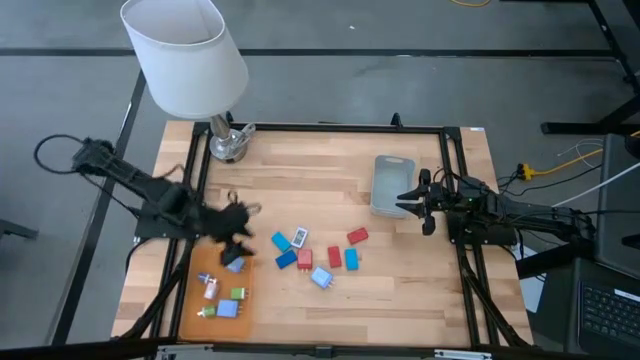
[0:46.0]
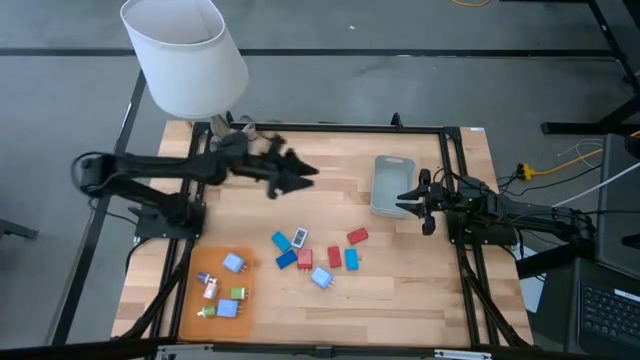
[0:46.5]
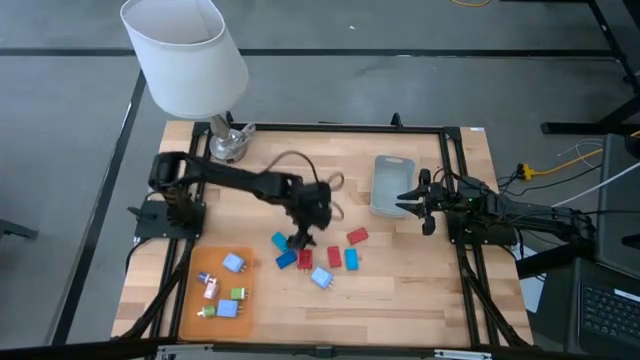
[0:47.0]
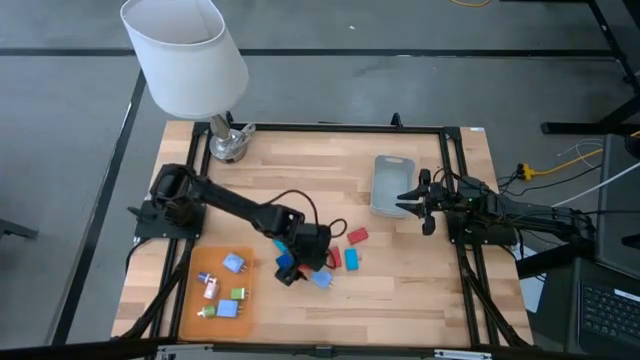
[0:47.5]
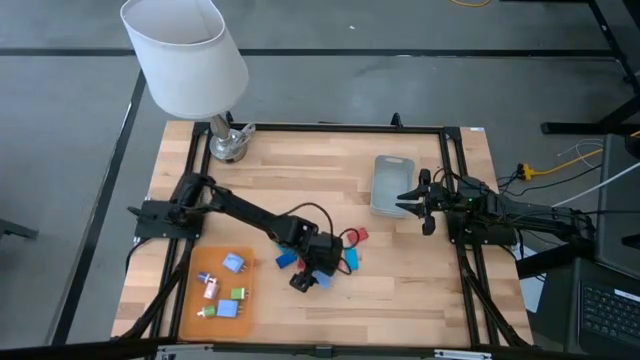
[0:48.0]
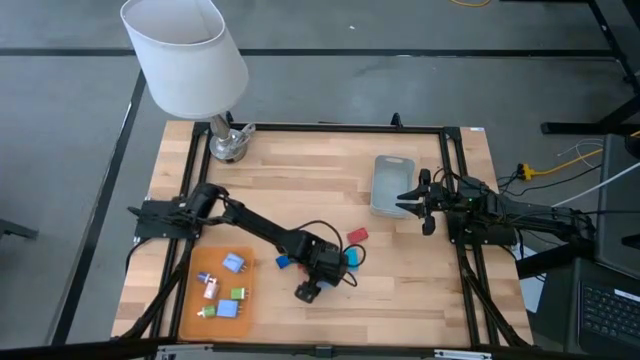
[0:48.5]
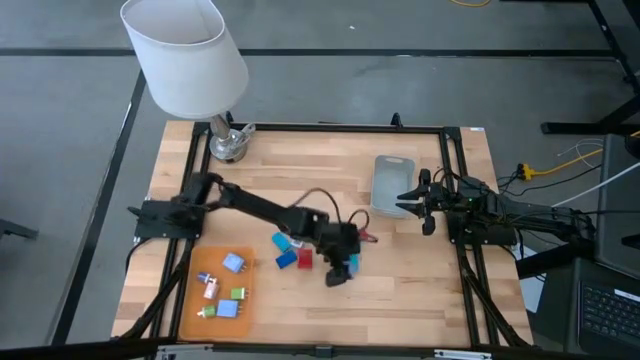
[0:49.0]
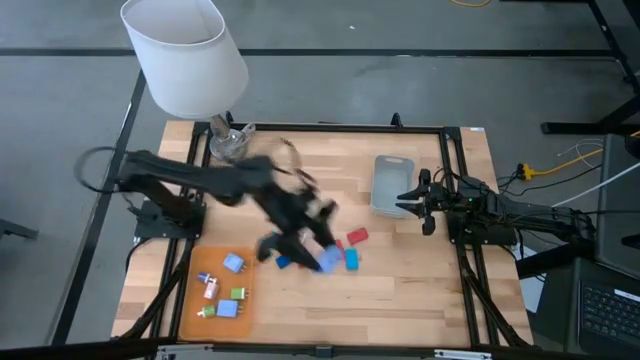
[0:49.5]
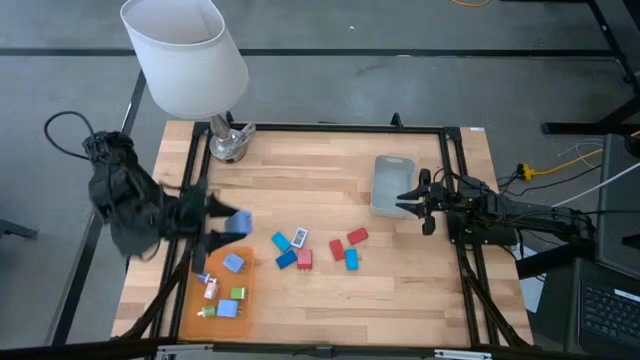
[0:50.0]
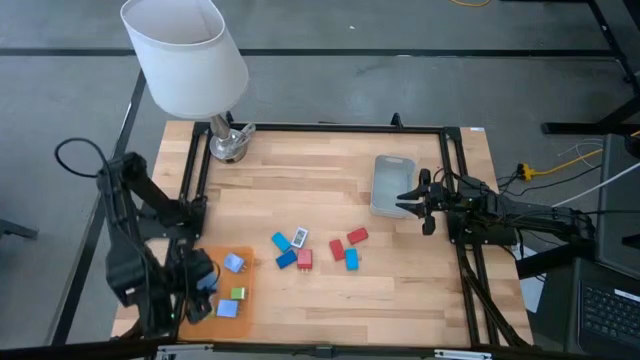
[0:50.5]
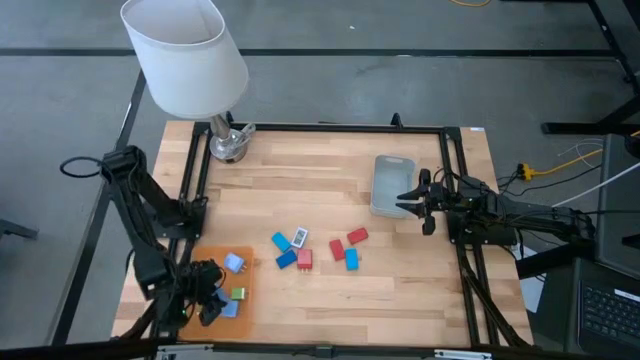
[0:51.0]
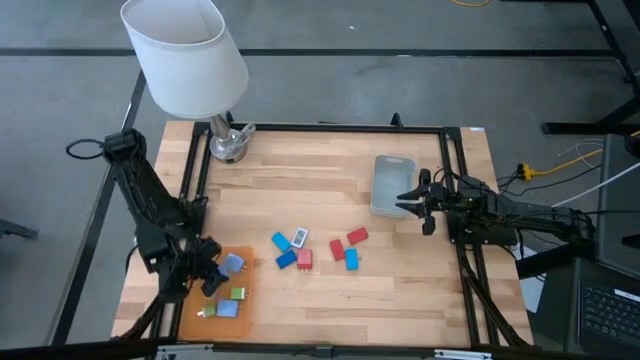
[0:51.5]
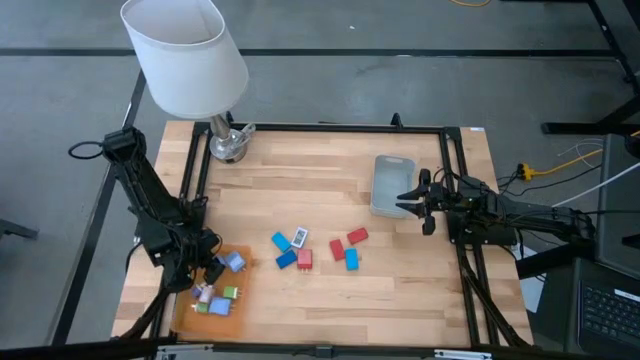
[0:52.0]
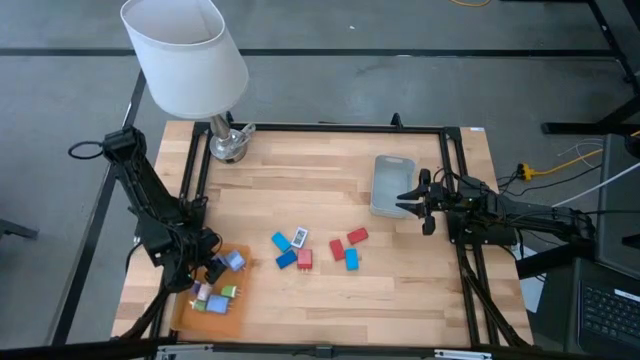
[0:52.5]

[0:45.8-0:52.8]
Task: Pick & Place Office items
Put the light blue charger adapter into the orange bin

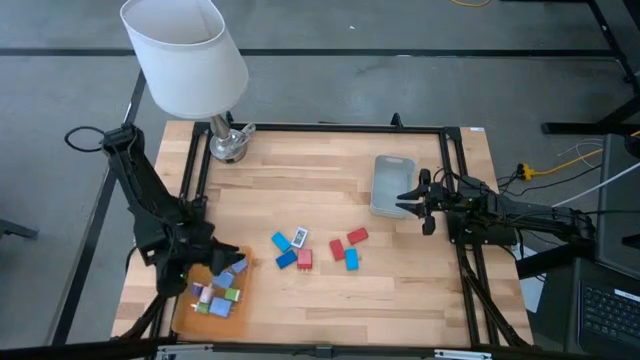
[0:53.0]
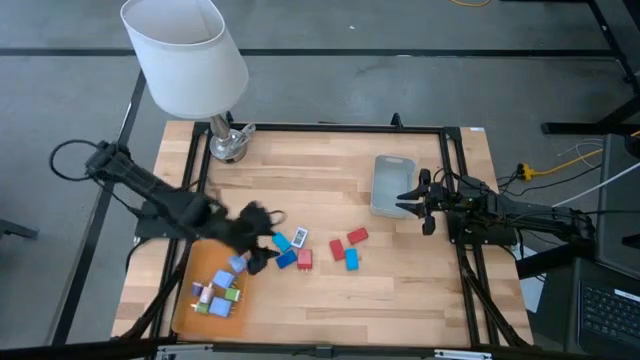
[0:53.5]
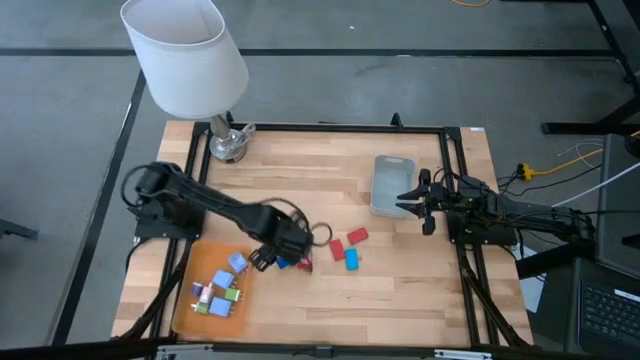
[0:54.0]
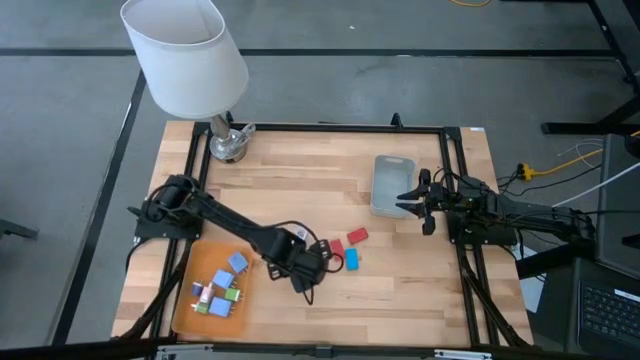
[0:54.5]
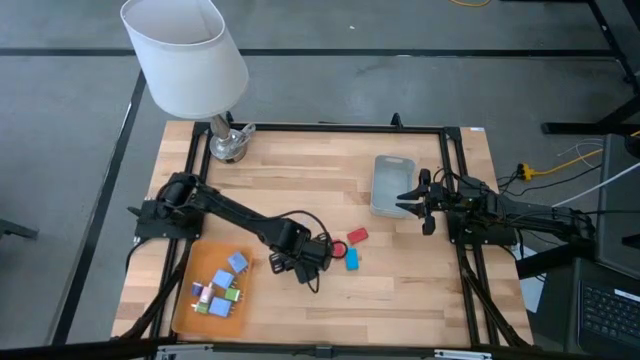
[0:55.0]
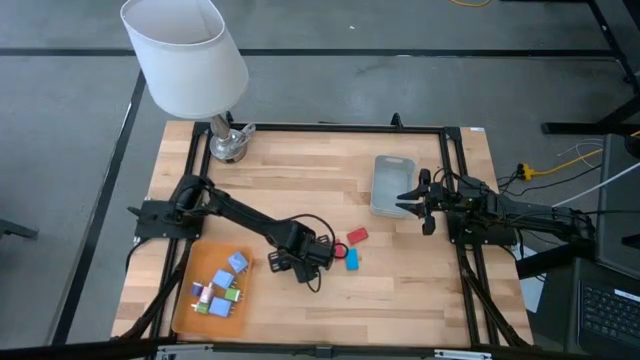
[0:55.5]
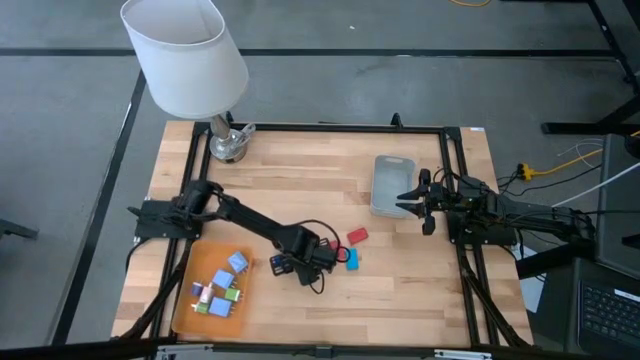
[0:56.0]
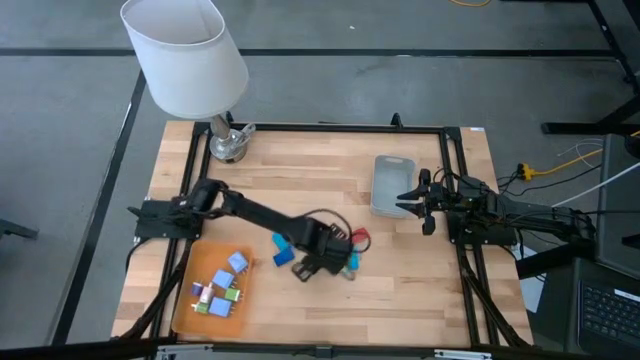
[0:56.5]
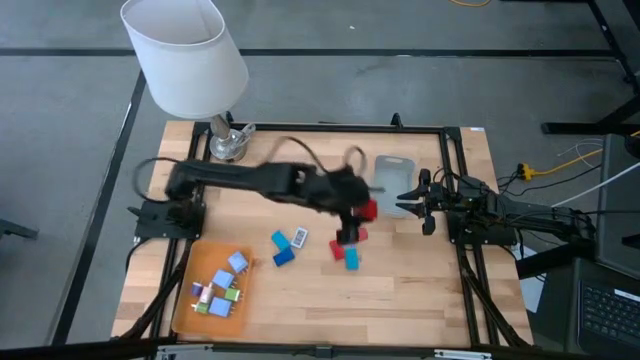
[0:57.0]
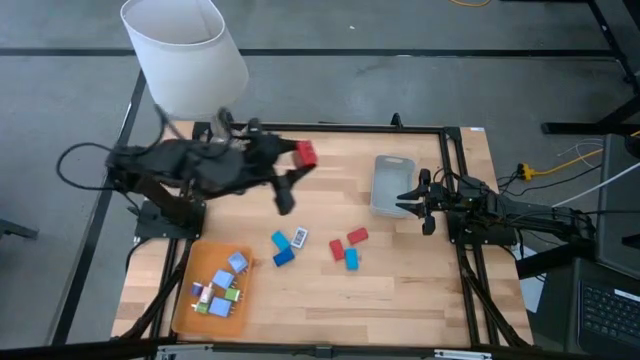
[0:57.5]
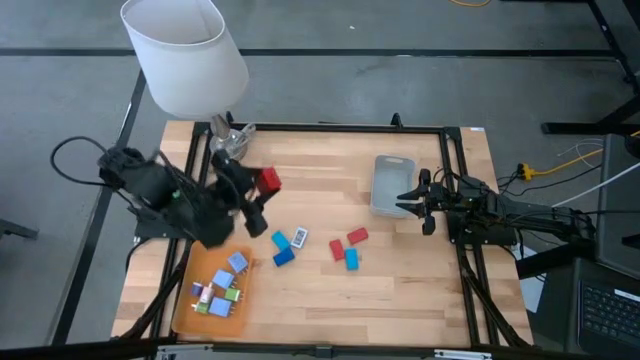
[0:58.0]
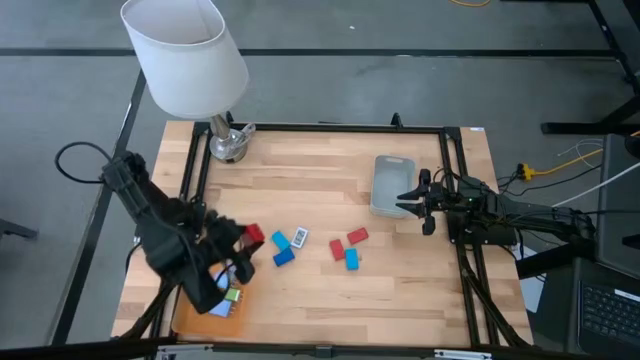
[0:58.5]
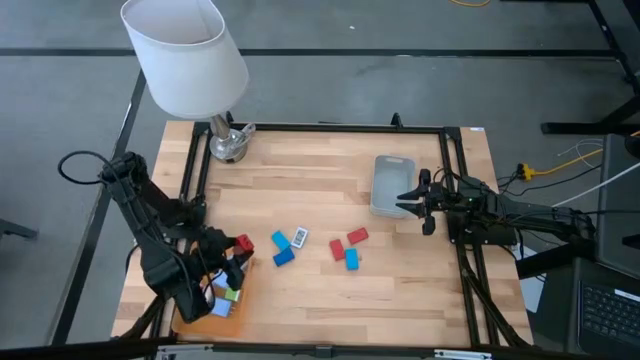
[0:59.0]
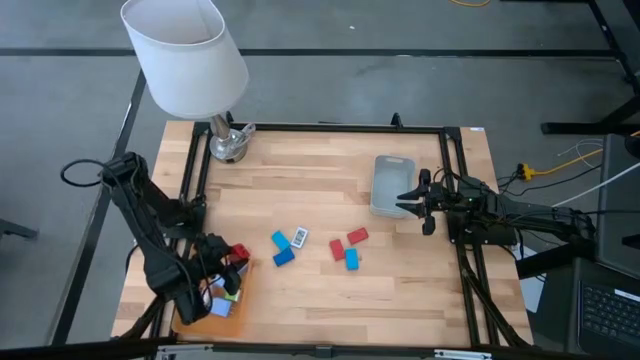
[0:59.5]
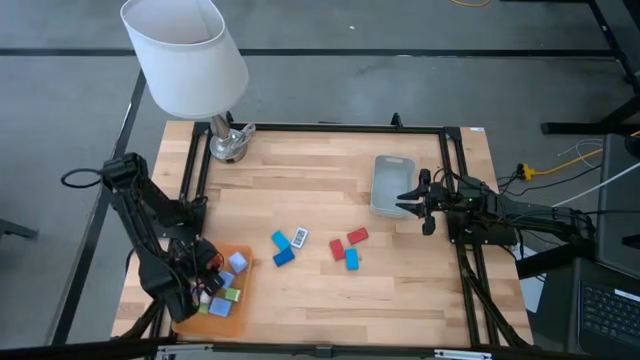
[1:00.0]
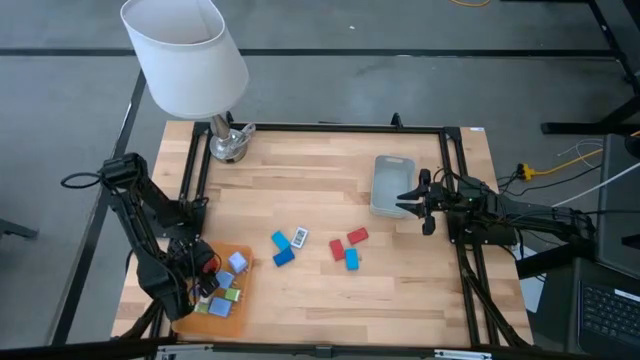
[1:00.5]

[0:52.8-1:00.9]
Put the red charger adapter into the orange bin

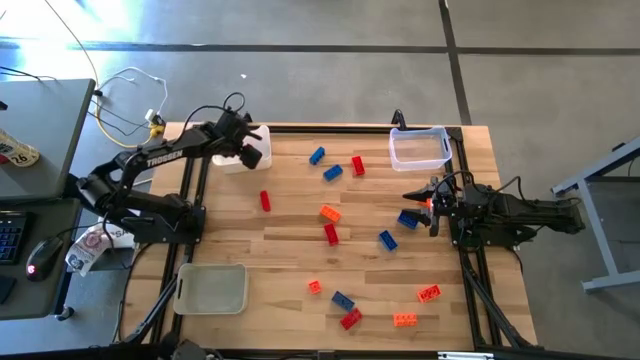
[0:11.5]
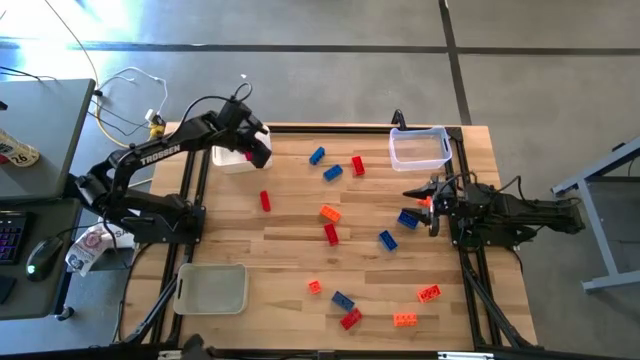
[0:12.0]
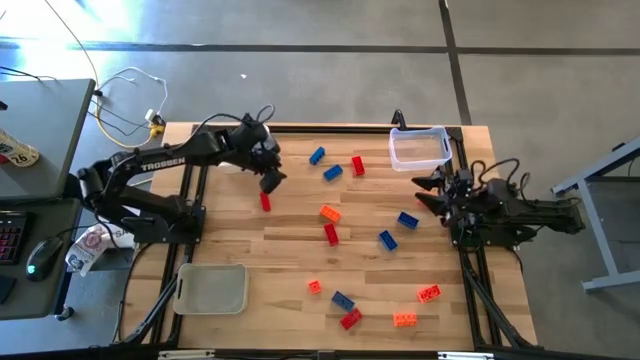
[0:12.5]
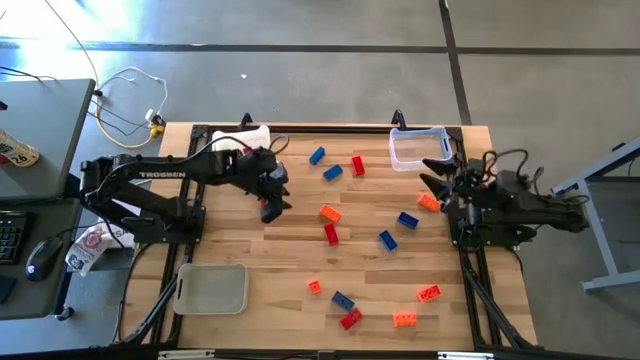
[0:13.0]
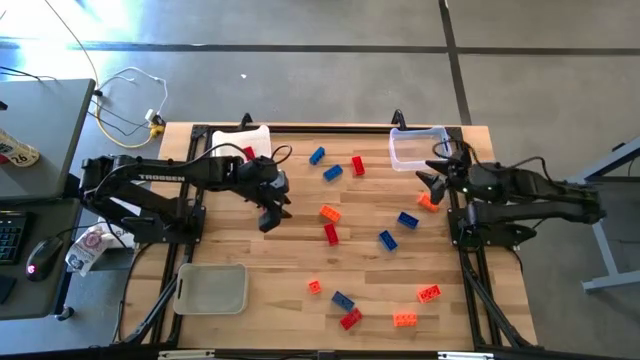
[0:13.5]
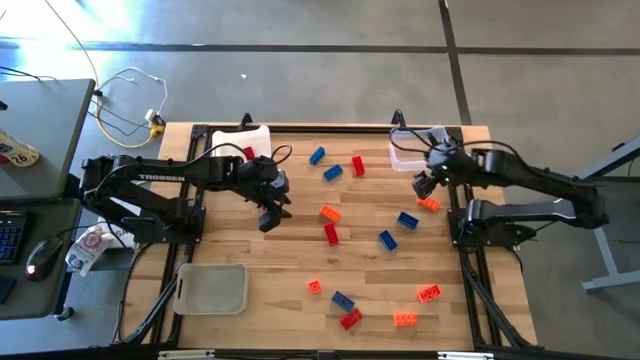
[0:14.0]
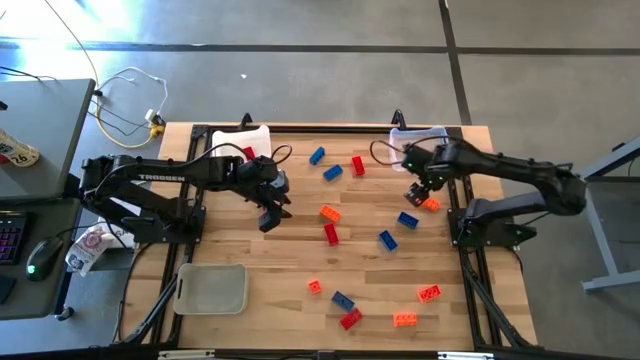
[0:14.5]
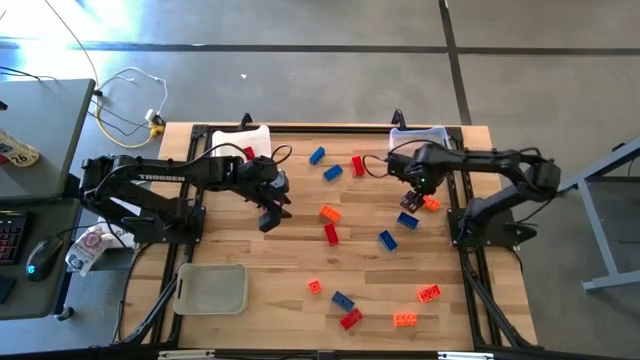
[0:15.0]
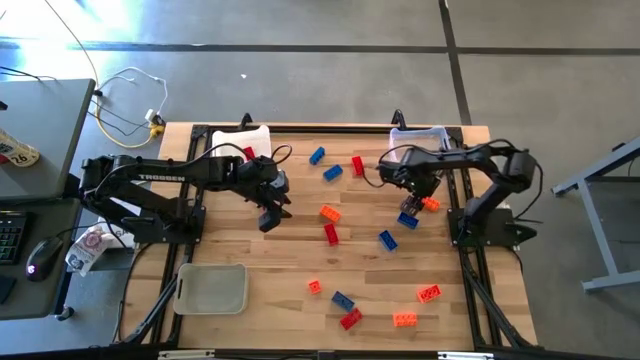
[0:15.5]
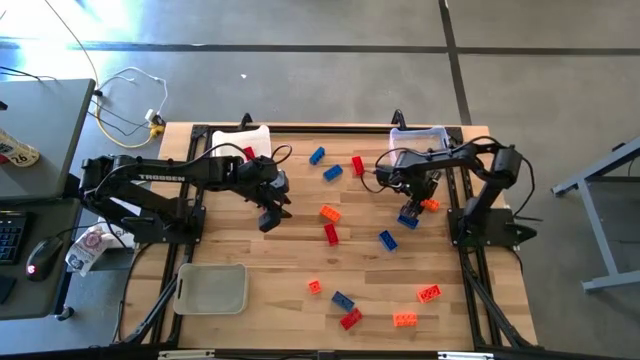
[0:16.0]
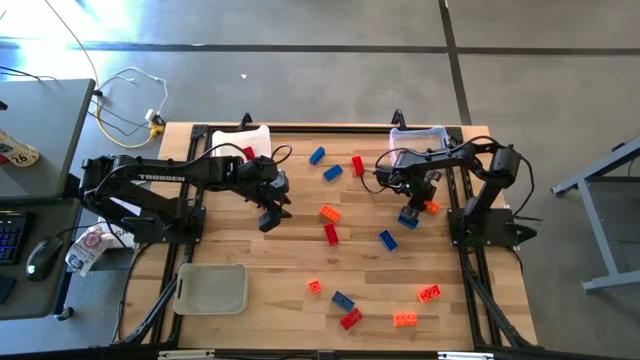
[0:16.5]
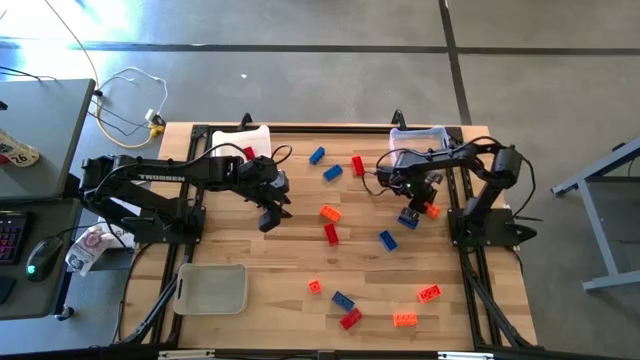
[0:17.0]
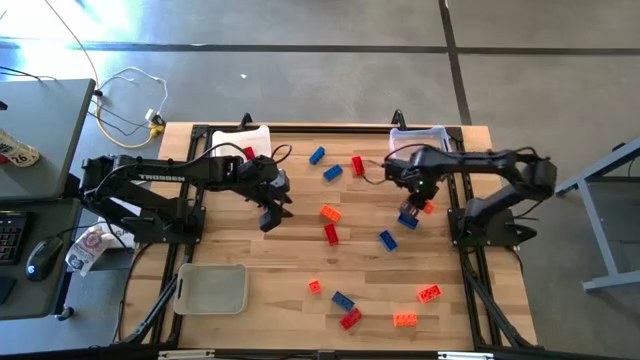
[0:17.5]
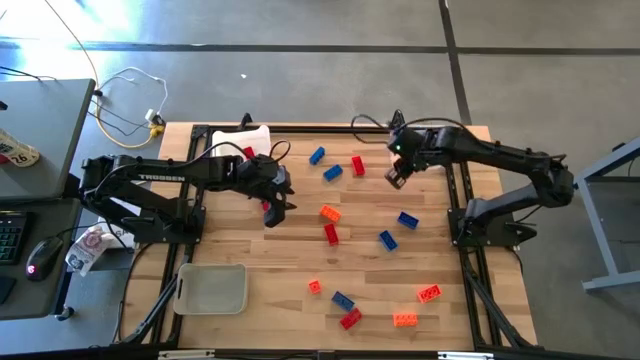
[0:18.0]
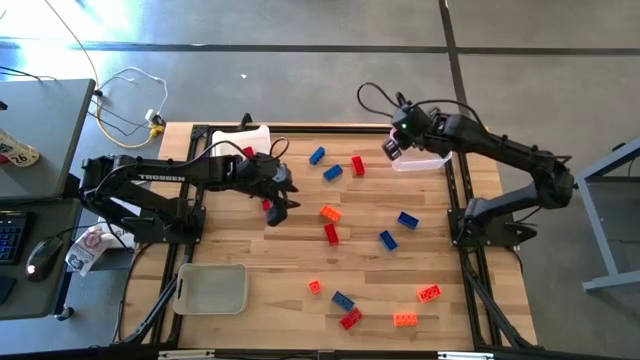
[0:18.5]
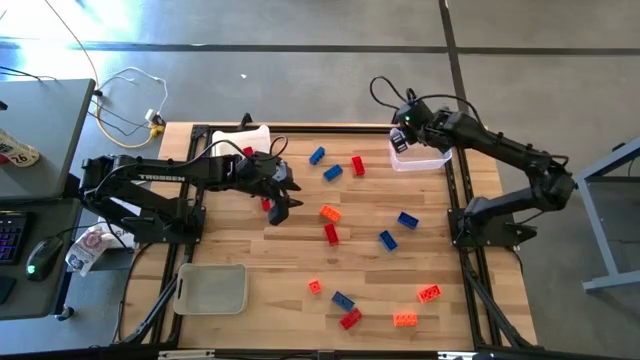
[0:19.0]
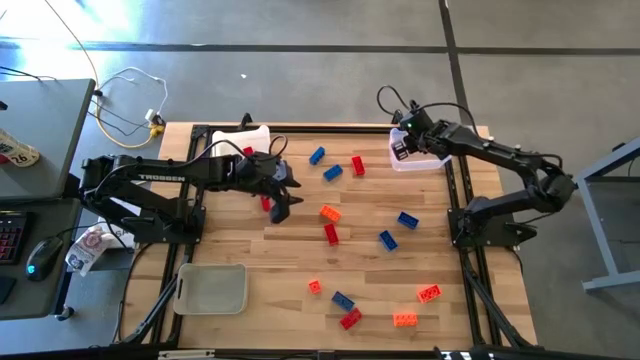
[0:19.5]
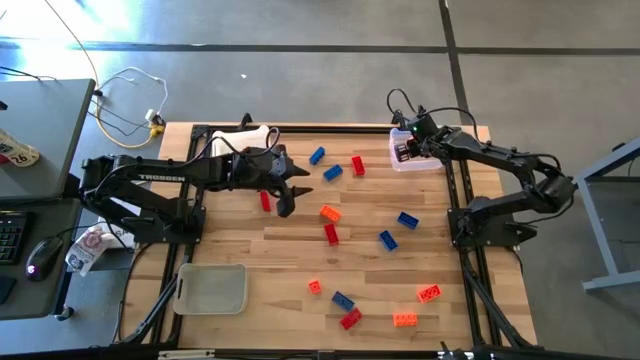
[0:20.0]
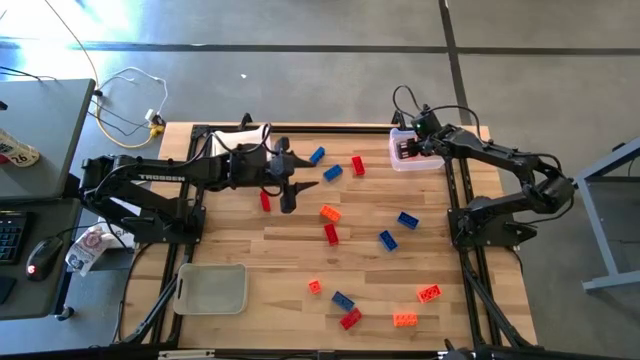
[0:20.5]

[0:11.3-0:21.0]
Task: Sort & place blocks by color
Put the orange game piece into the transparent bin
